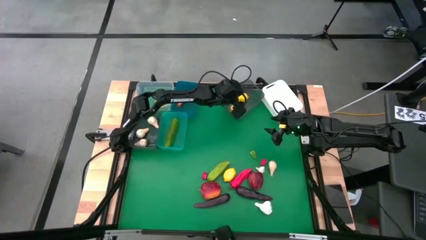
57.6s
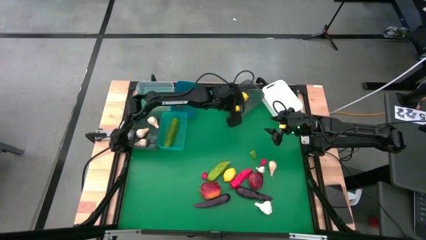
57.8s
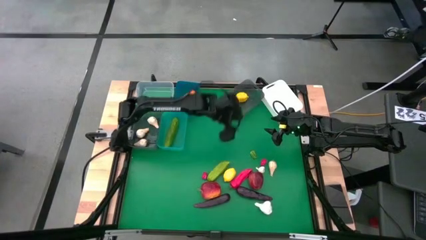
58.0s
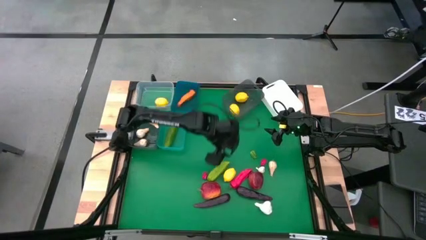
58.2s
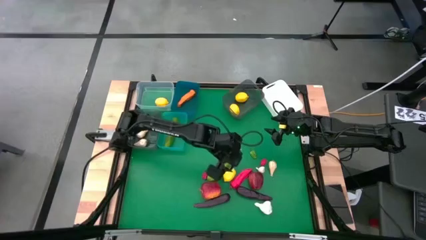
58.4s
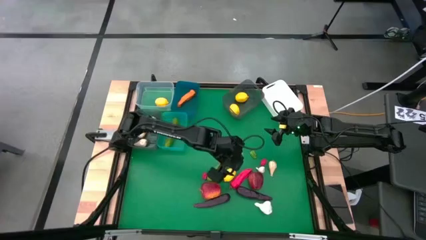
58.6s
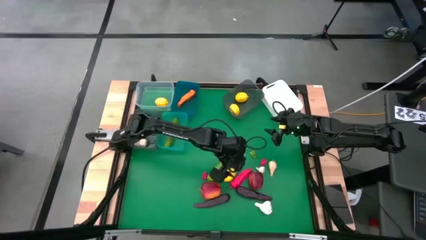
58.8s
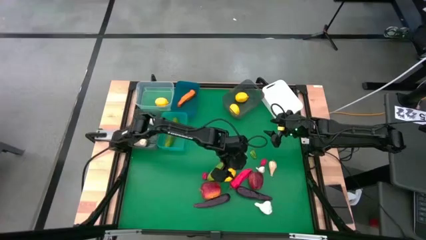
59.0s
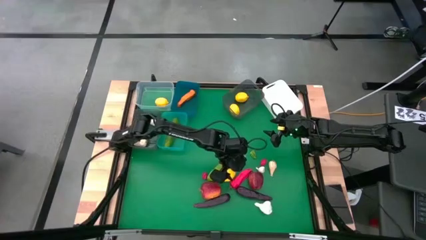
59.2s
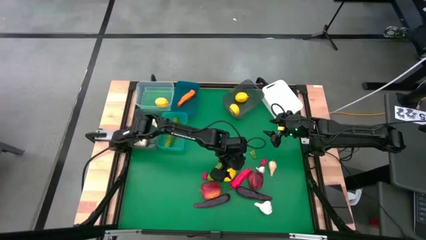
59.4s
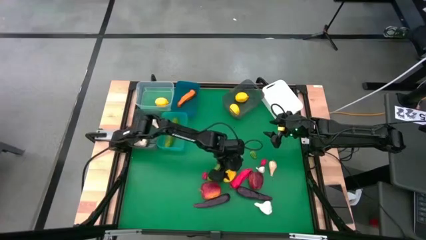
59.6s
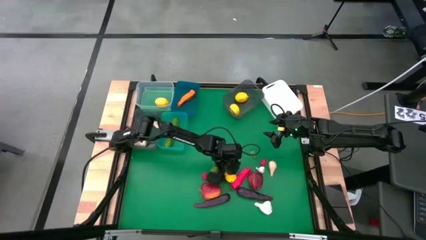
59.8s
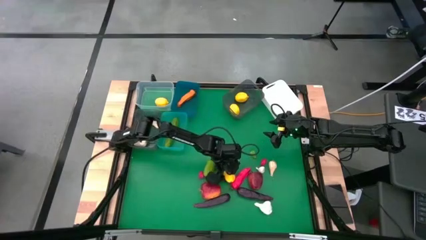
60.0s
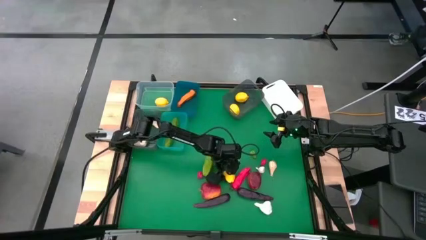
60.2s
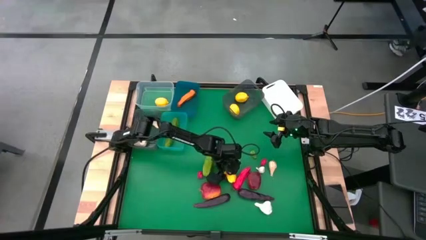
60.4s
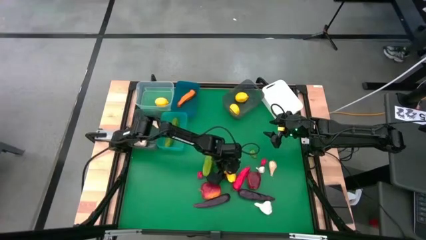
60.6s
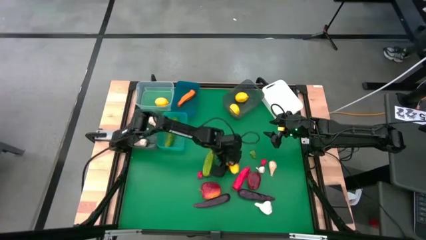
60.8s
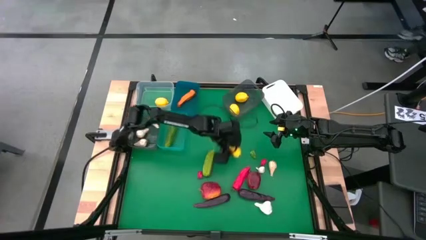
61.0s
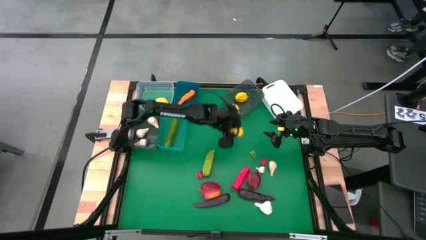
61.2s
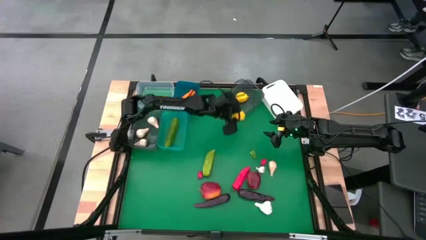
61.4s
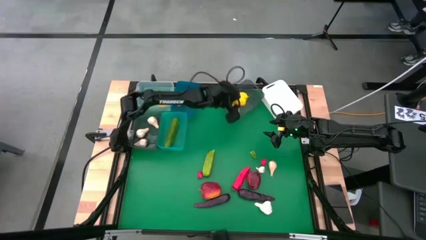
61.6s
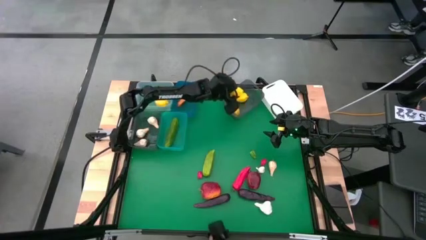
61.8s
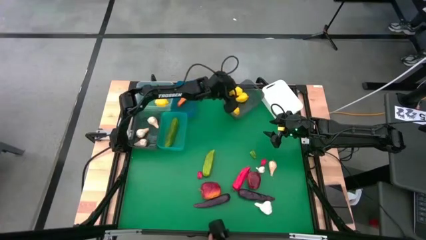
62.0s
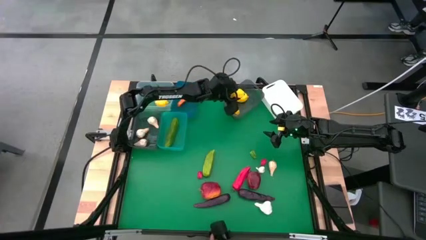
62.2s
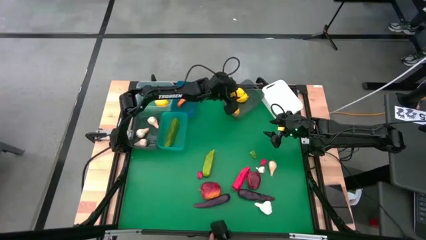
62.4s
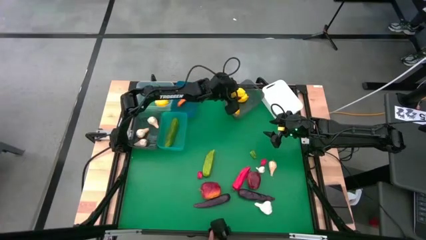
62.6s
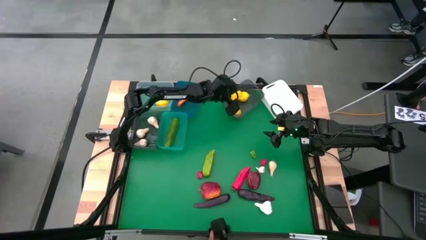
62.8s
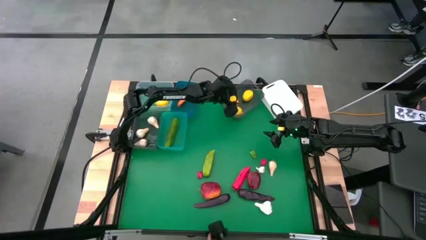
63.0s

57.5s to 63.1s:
Task: Sort produce into baskets
Put the yellow lemon into the right black bin

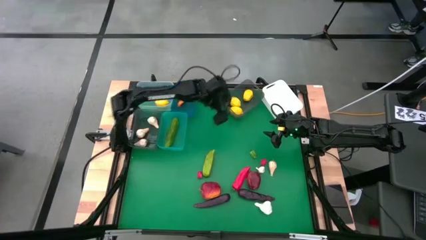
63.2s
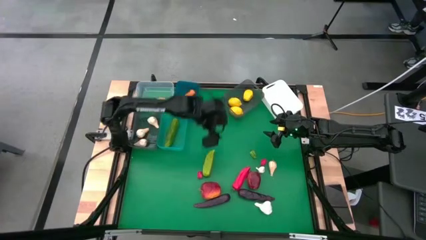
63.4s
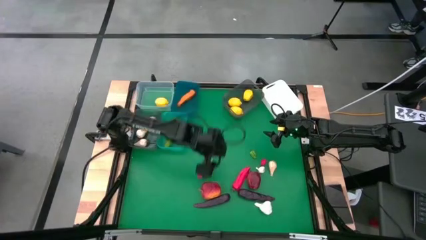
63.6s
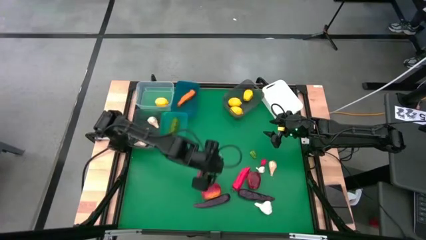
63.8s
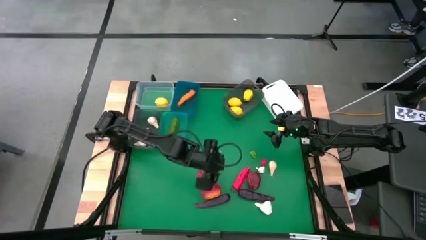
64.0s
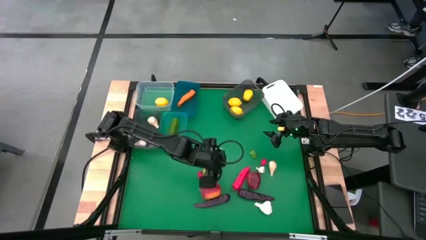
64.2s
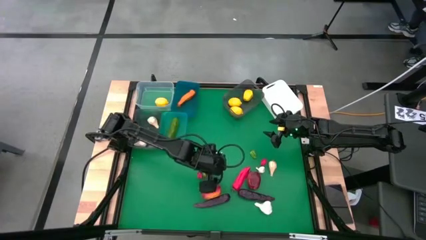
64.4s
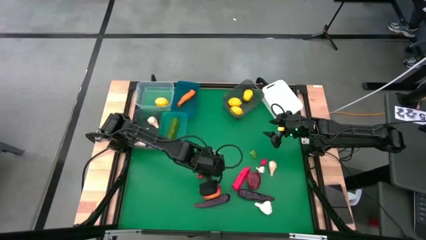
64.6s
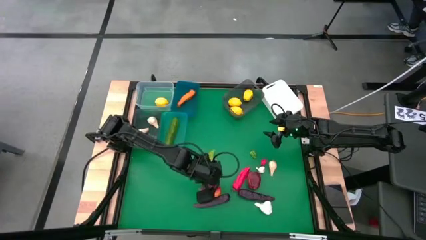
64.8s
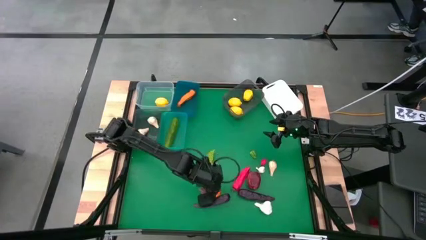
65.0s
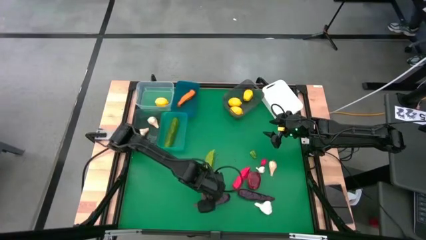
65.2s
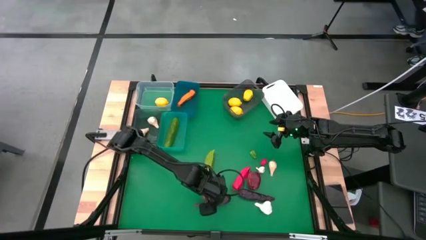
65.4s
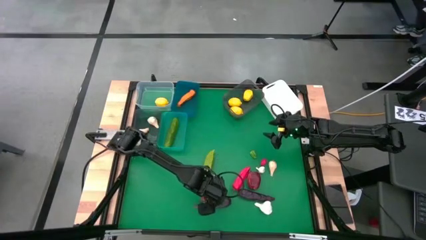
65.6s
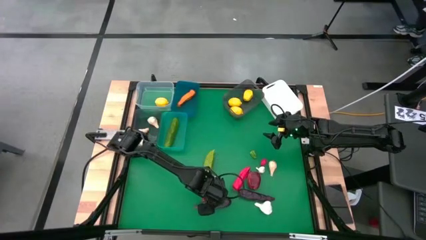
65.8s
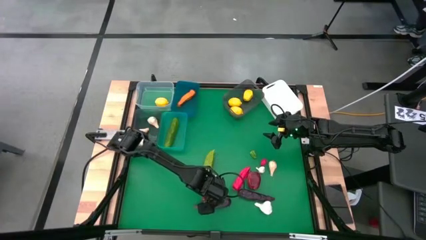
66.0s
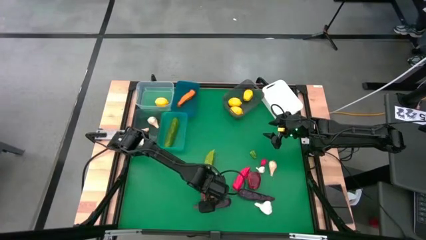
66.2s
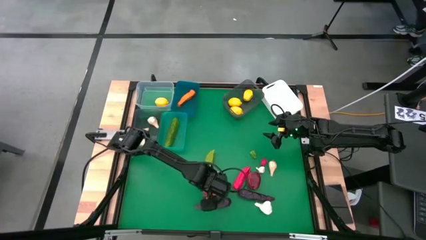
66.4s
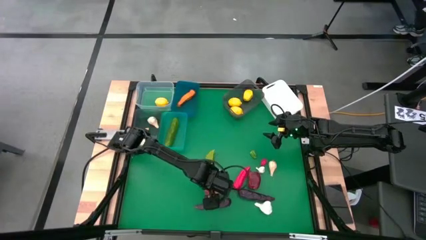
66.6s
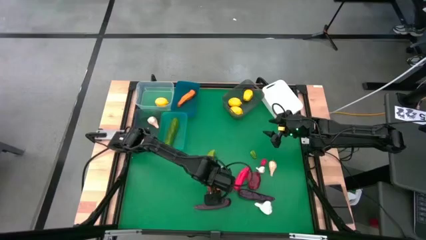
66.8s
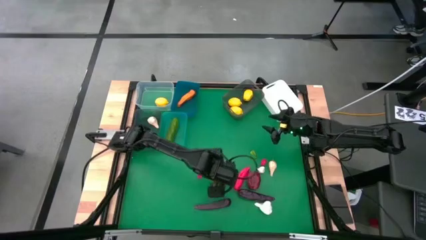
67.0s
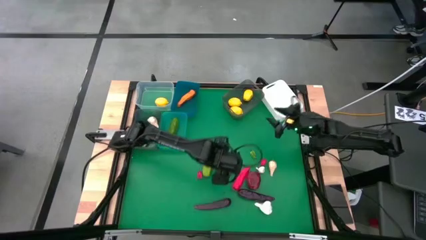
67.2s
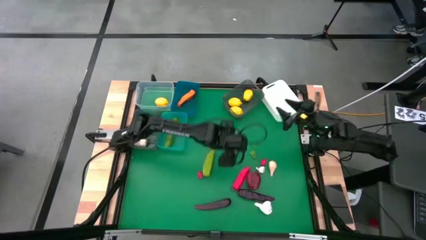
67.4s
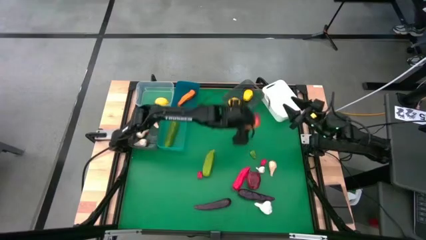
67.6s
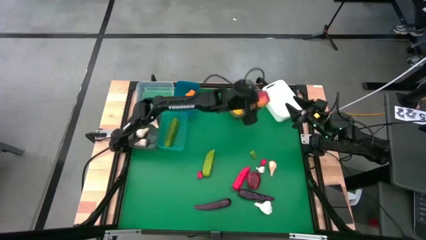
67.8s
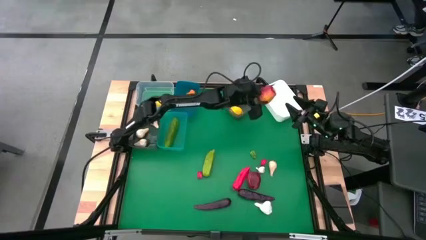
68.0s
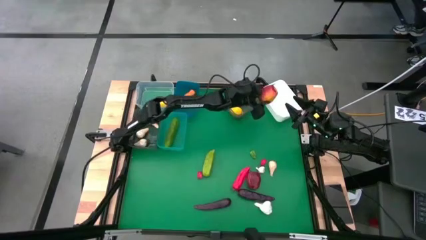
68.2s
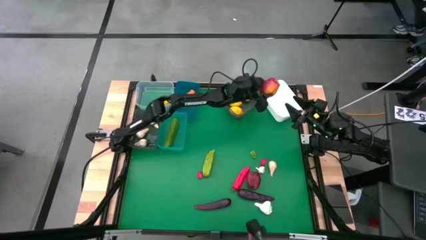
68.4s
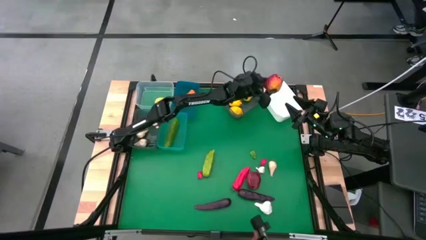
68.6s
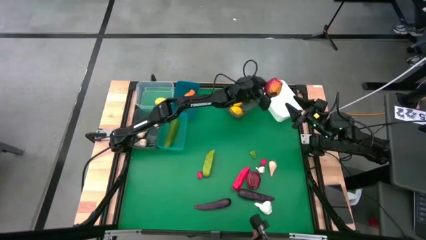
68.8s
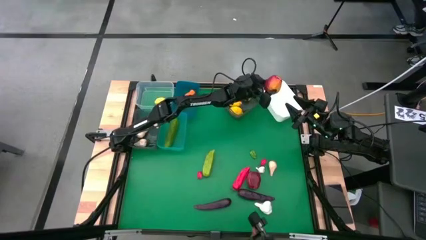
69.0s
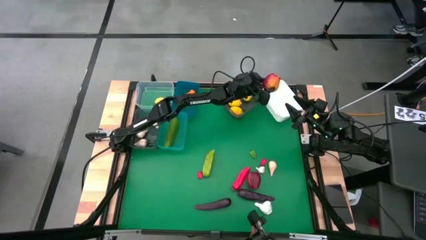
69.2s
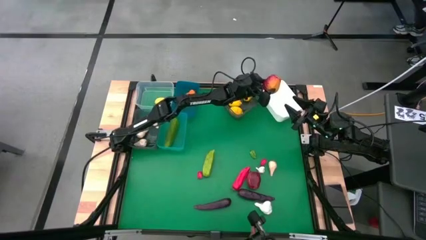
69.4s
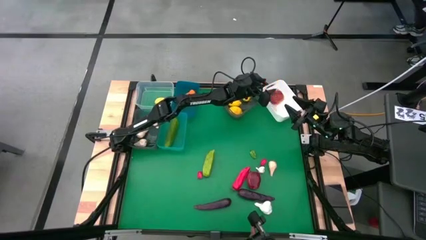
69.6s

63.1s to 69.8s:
Put the red apple into the white bin

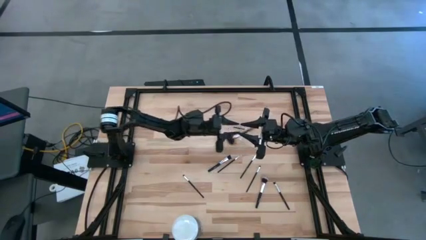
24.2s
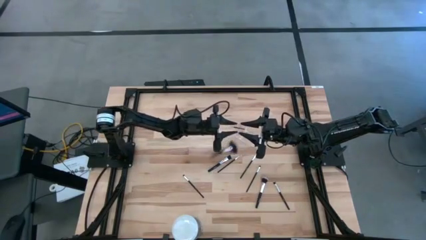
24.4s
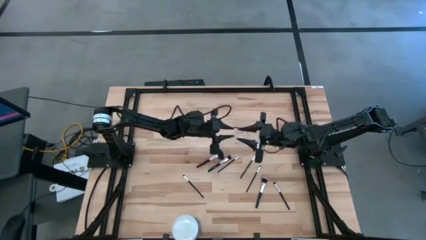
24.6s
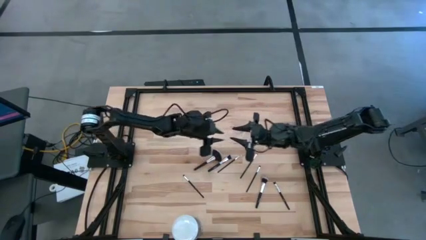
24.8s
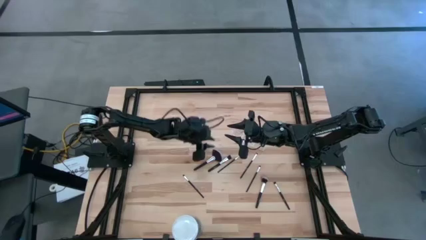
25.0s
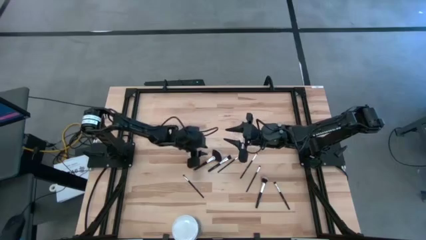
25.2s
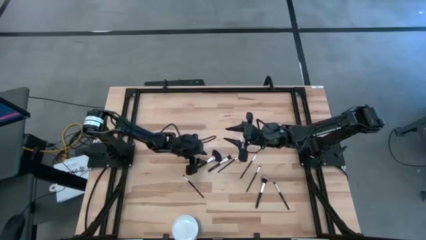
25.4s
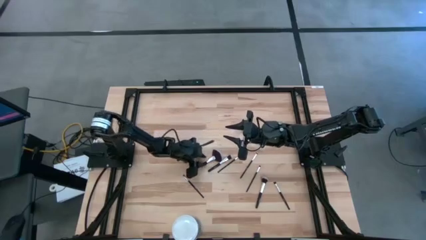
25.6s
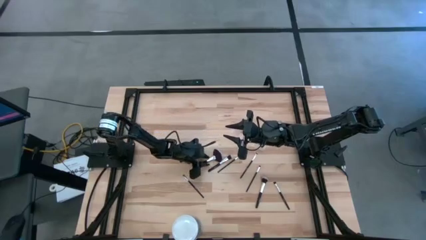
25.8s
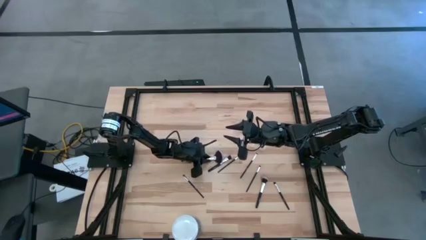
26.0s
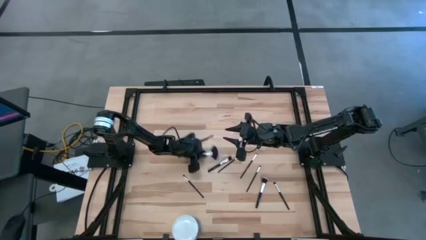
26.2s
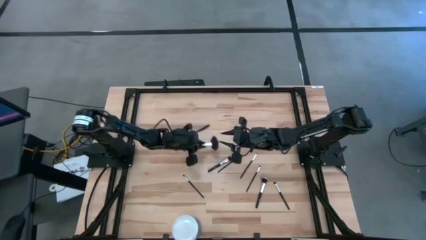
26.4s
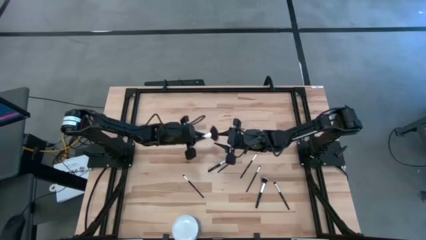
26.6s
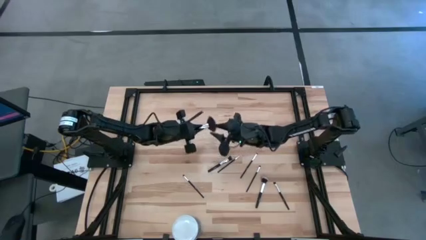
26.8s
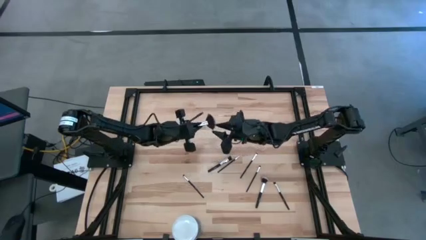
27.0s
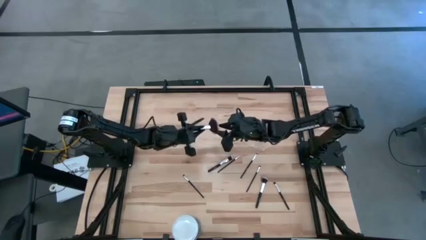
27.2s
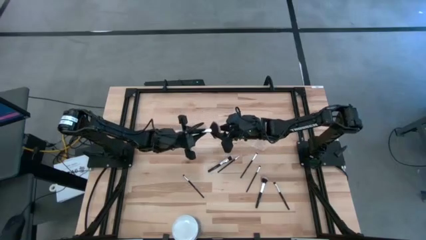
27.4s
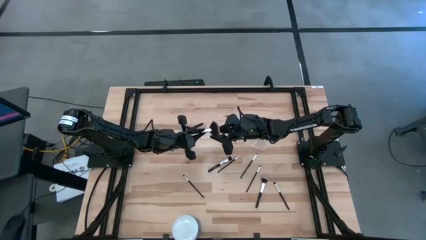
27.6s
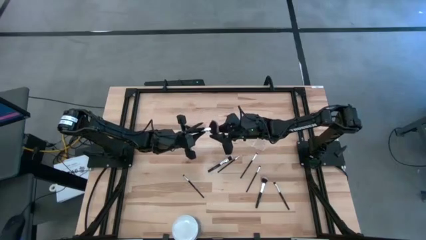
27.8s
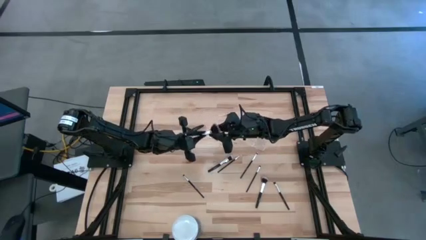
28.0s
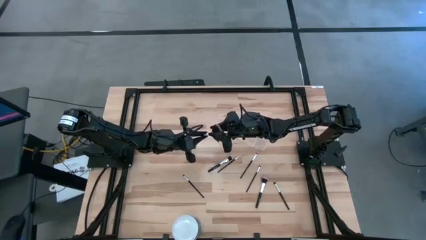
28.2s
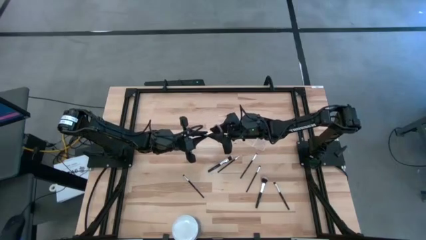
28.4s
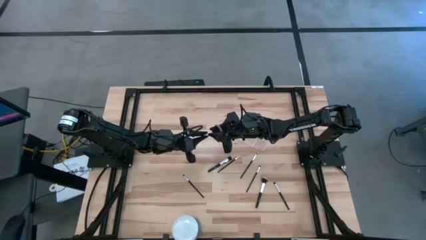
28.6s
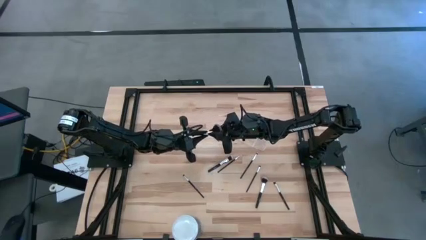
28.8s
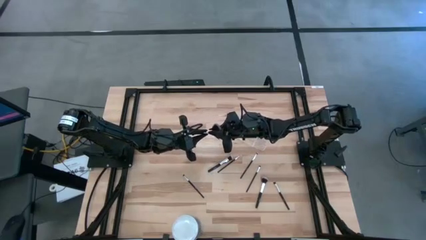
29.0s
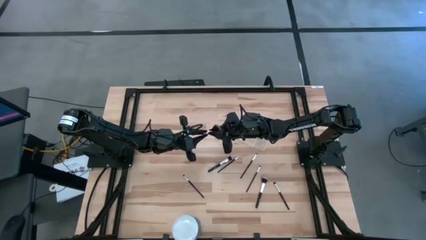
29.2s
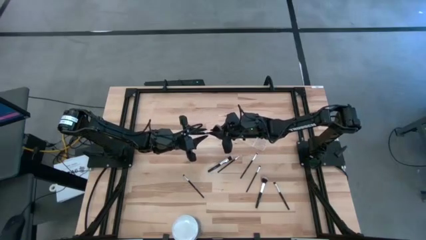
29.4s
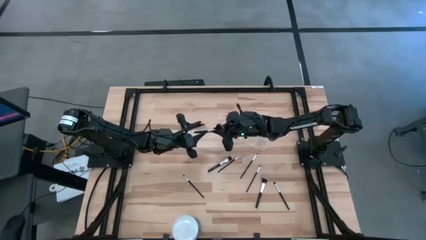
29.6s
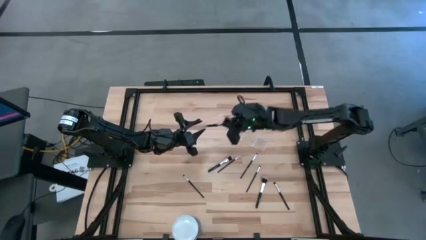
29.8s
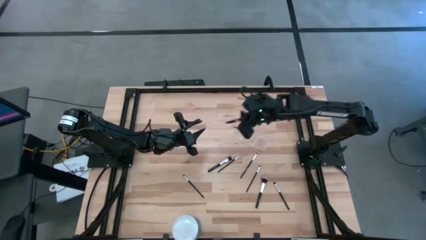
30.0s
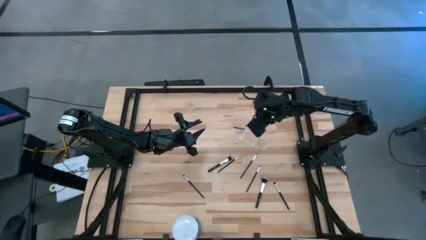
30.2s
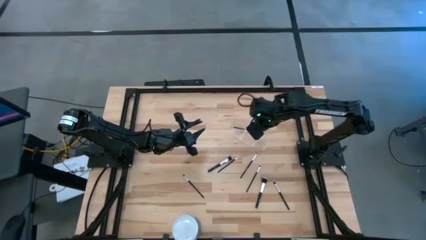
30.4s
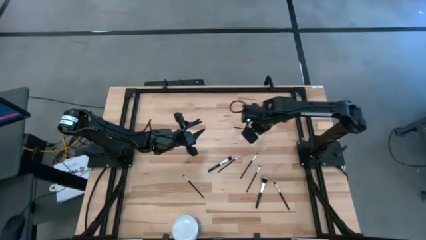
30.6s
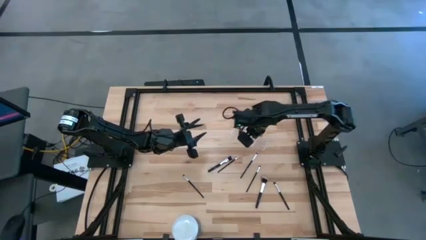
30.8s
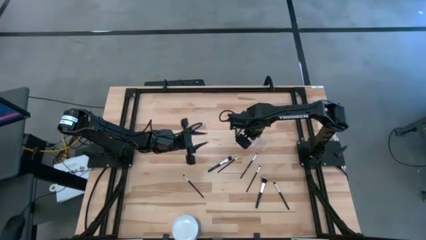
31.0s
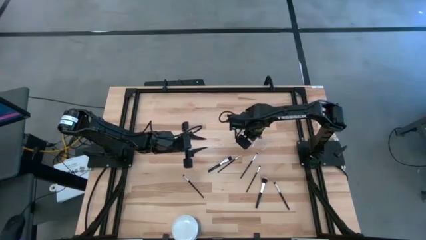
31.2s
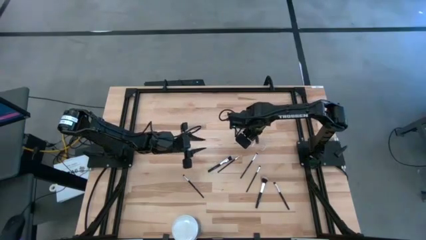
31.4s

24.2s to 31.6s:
Task: Pick & Place Makeup Brushes
Put the black highlighter brush into the makeup organizer
